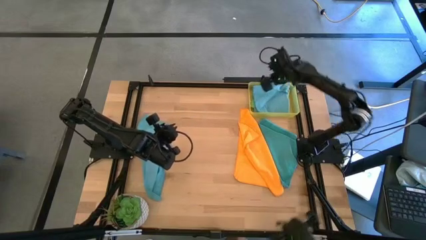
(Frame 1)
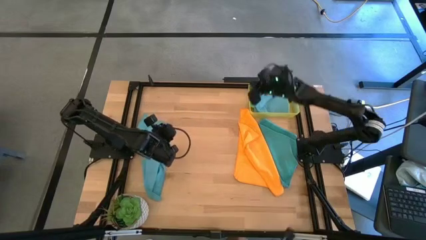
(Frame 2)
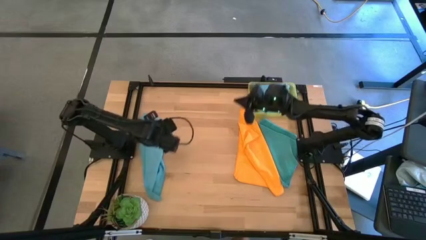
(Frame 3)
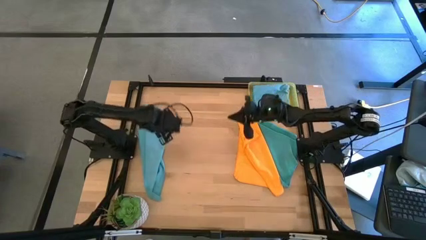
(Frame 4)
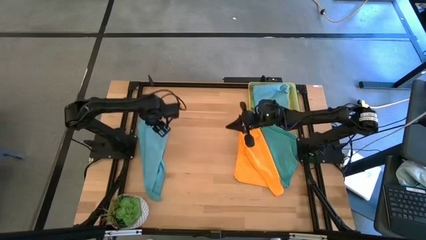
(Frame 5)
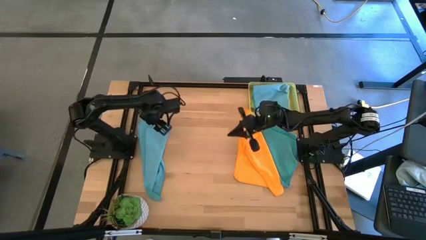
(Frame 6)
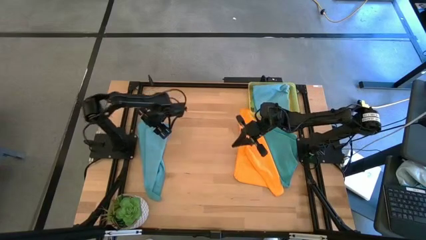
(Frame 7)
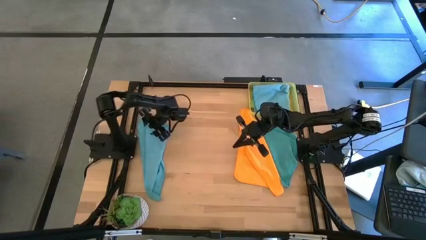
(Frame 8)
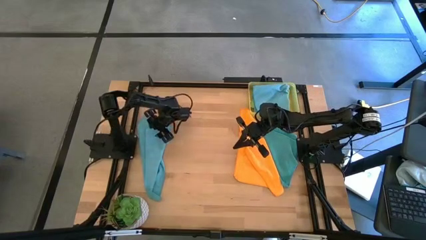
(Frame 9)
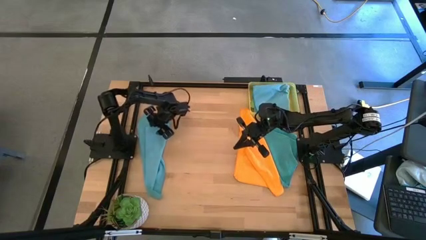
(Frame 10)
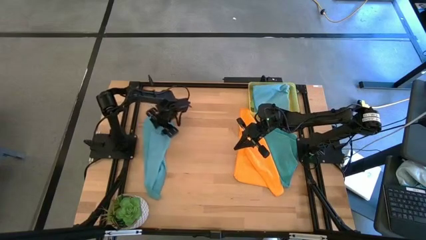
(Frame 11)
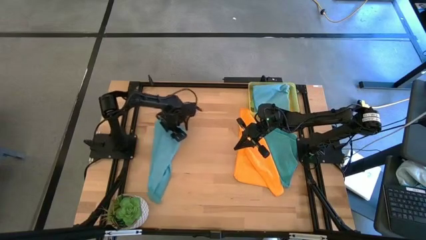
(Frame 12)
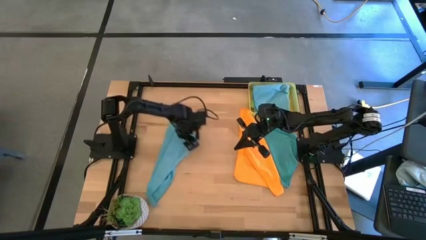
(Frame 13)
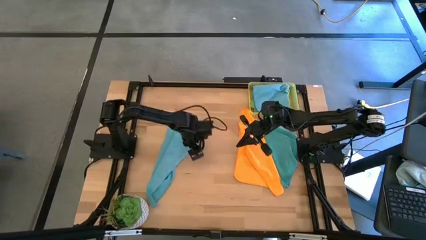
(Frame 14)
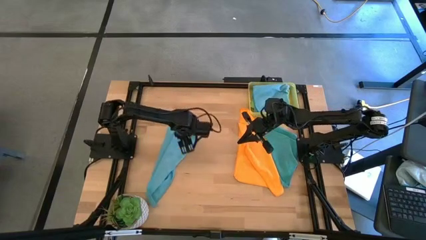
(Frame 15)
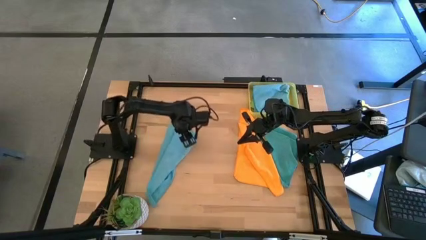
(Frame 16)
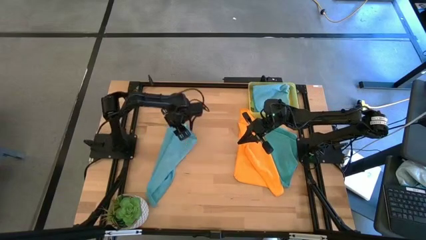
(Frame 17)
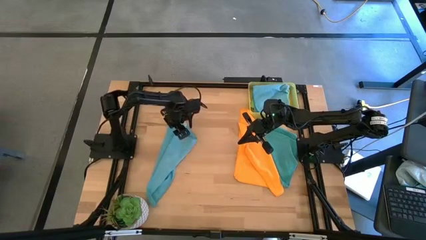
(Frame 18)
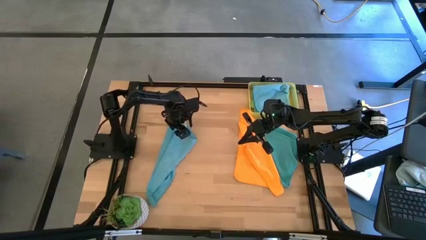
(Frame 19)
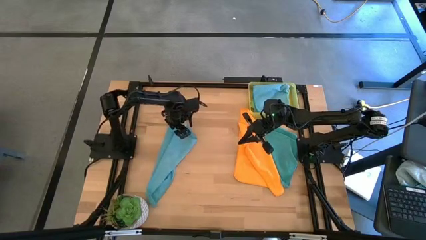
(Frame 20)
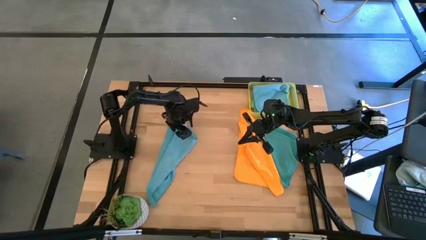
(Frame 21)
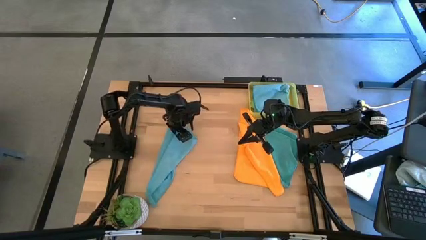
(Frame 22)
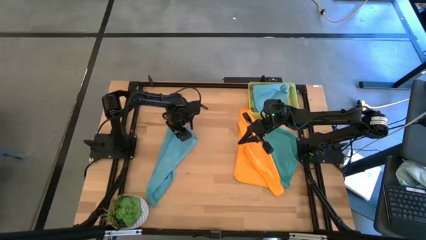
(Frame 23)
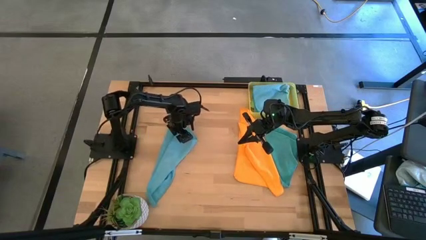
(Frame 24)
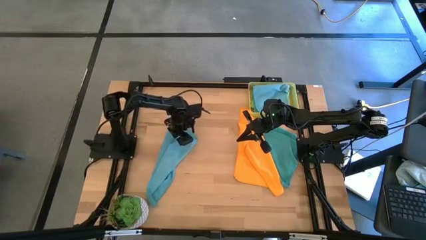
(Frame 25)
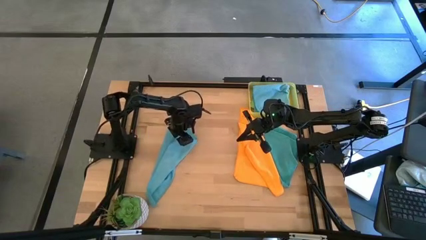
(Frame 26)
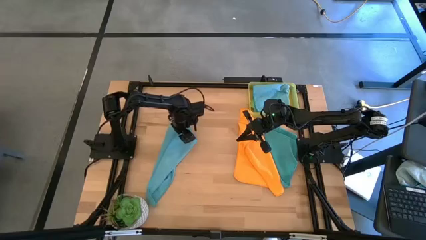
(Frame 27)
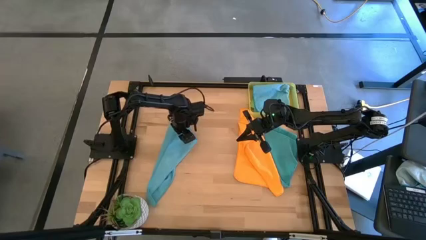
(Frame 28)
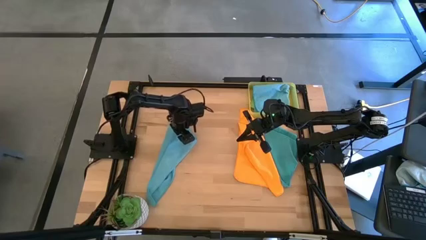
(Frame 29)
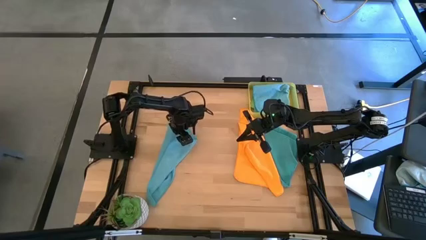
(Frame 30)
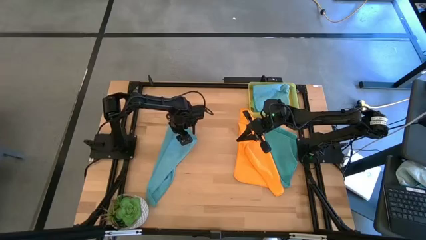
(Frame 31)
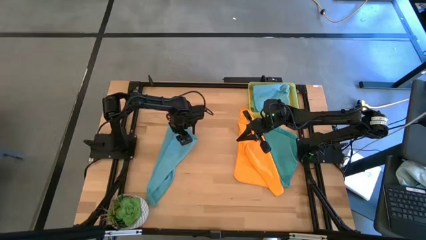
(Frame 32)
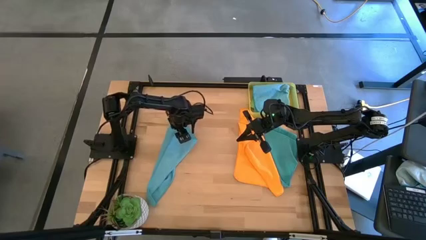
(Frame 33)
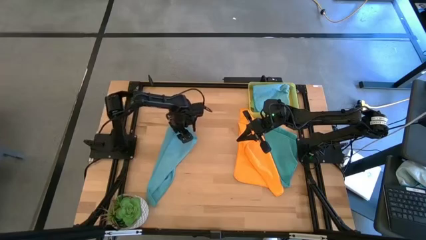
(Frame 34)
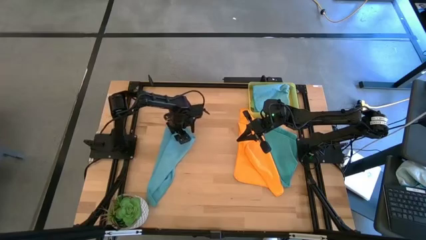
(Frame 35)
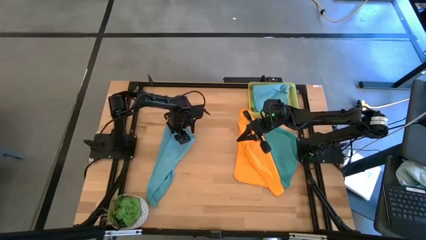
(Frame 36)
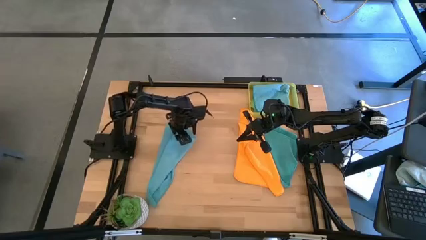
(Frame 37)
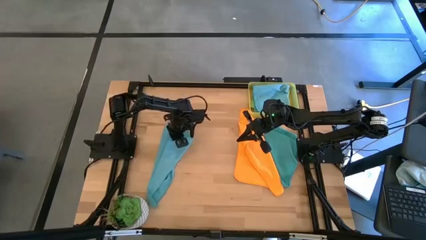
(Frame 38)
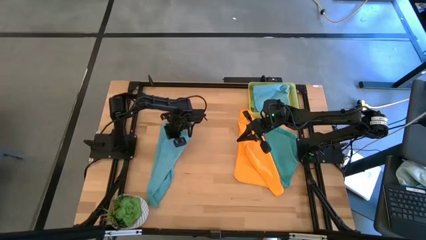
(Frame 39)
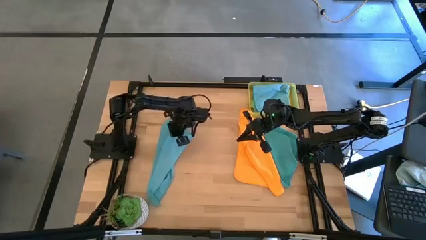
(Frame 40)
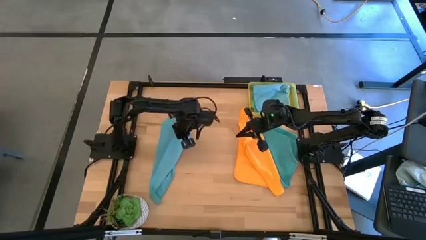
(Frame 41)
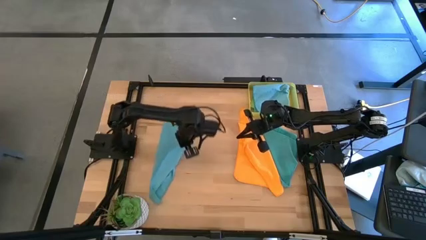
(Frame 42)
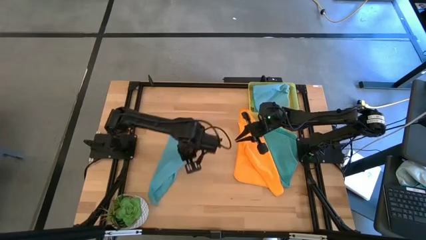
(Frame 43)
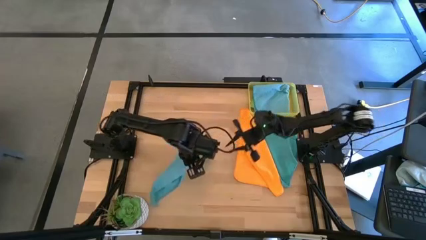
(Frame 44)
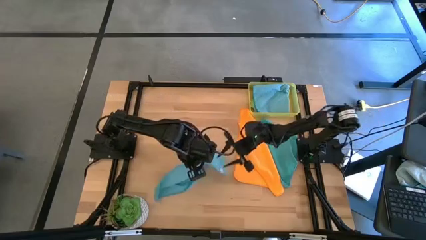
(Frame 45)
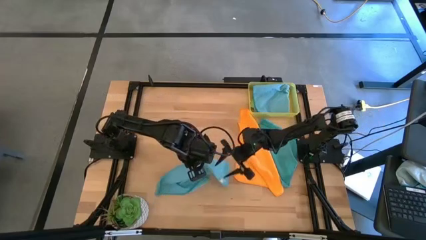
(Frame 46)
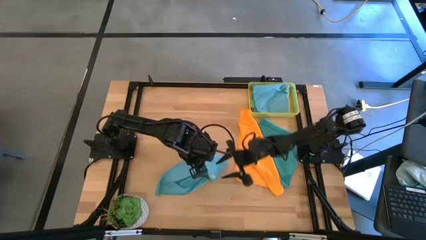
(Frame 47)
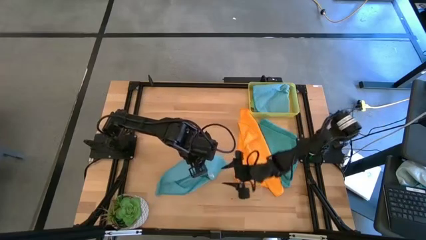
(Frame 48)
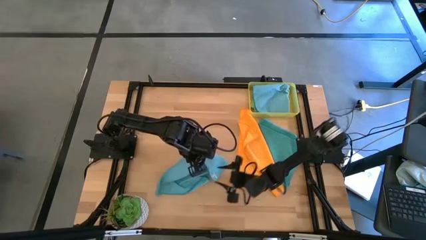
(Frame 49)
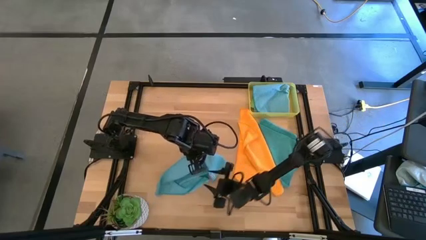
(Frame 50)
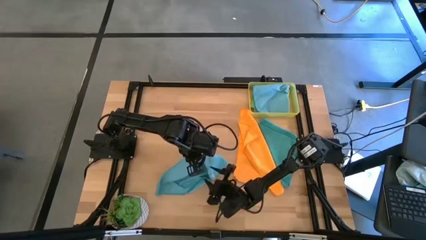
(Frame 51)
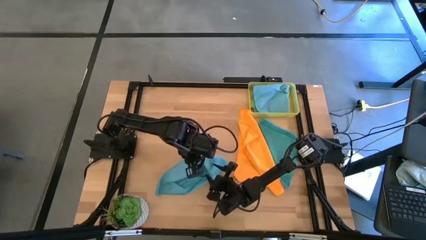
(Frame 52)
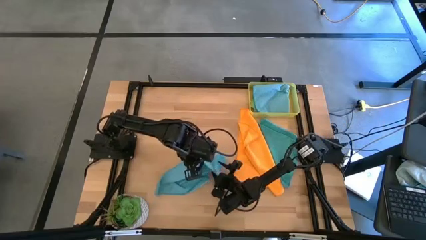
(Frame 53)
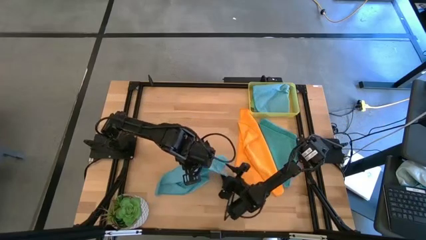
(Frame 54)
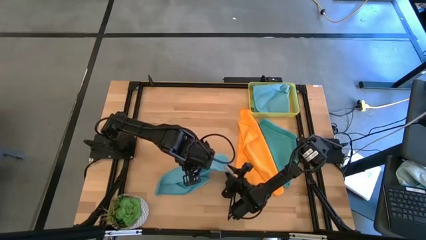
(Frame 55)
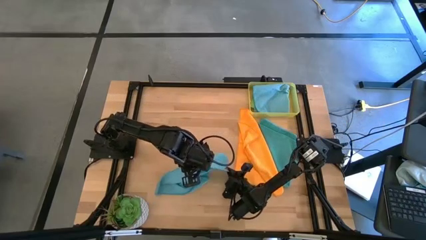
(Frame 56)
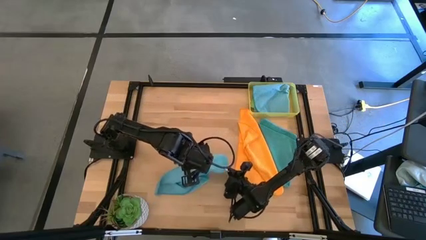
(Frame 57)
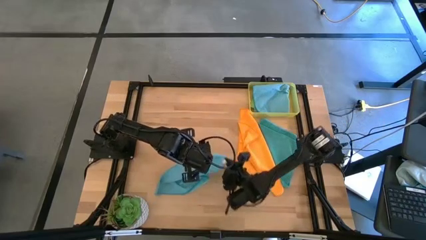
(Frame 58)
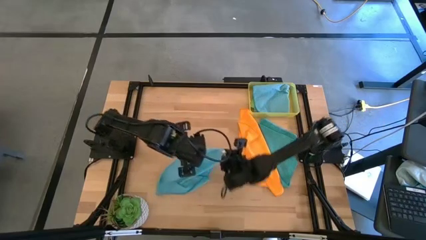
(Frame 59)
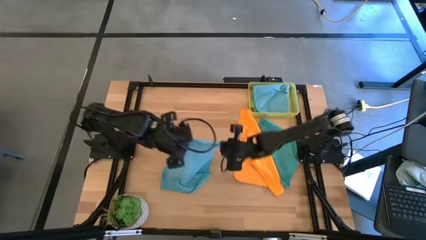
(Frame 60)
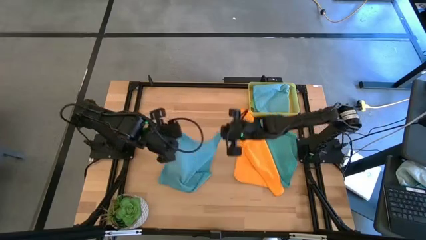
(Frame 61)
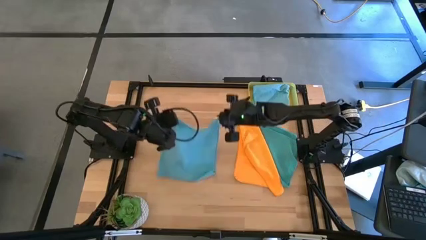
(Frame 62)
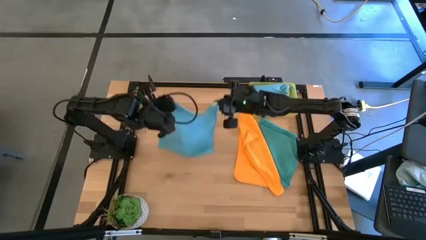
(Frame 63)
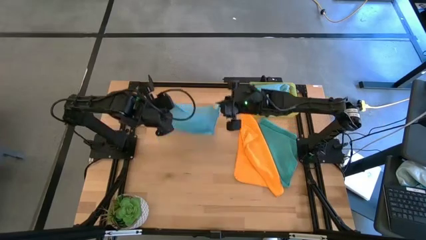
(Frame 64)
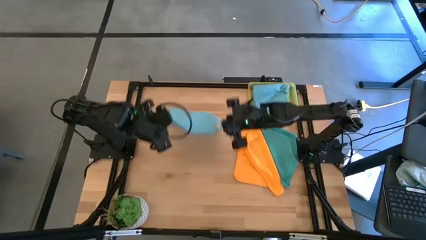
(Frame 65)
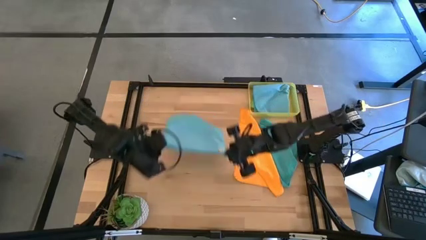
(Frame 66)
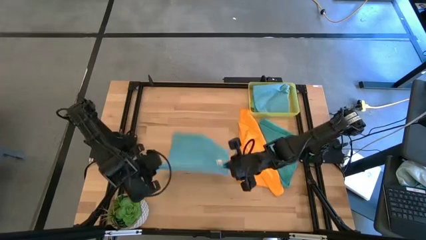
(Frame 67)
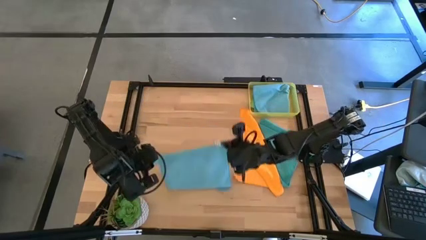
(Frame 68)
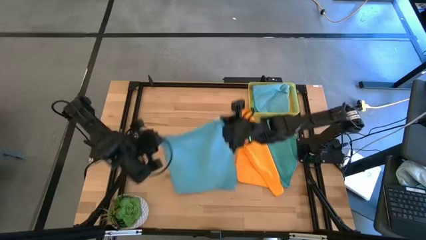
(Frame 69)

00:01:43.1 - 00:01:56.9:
Task: Fold microfiber towels
Fold the left blue microfiber cloth
